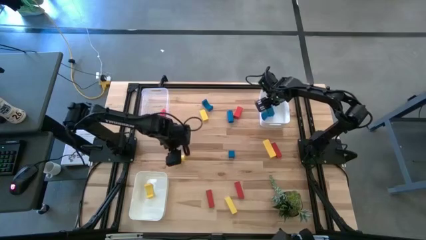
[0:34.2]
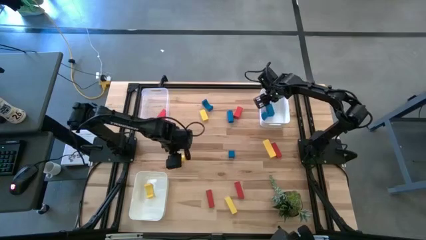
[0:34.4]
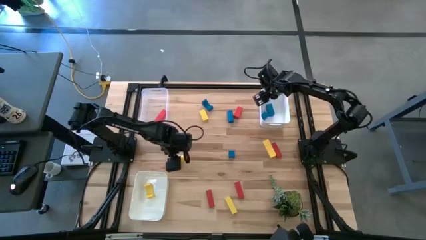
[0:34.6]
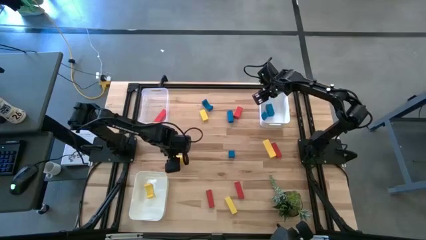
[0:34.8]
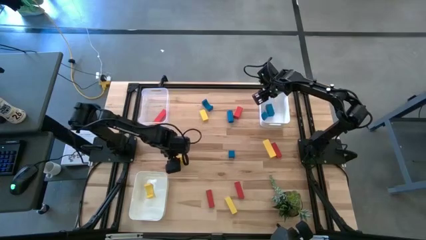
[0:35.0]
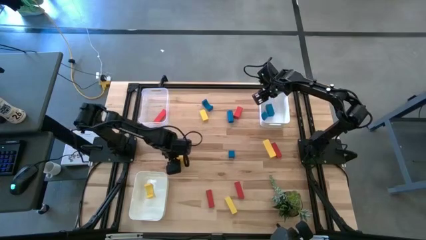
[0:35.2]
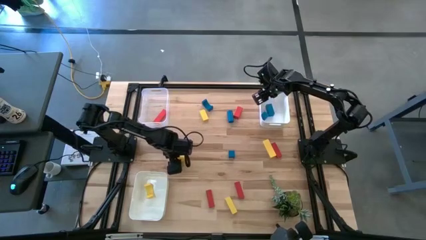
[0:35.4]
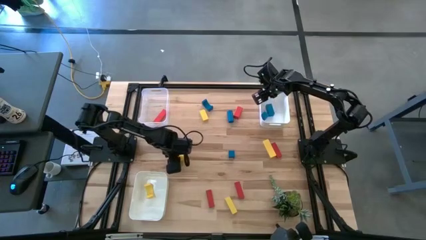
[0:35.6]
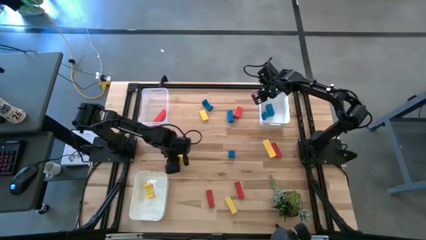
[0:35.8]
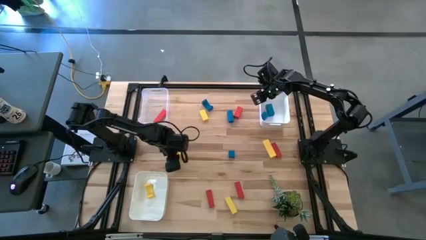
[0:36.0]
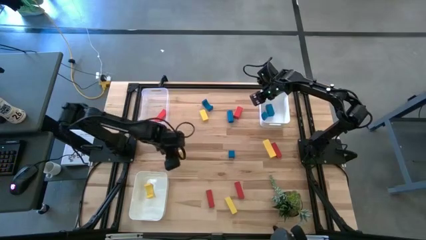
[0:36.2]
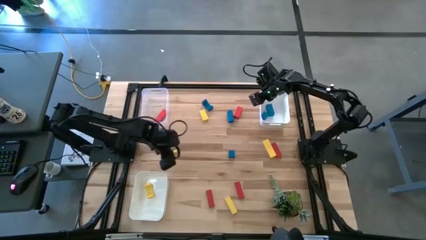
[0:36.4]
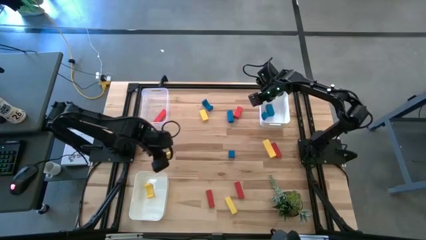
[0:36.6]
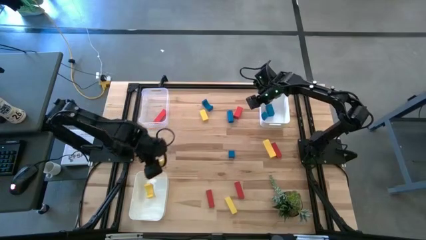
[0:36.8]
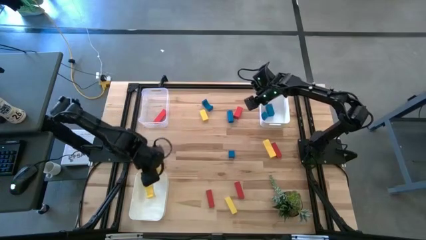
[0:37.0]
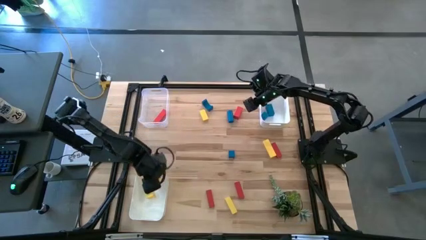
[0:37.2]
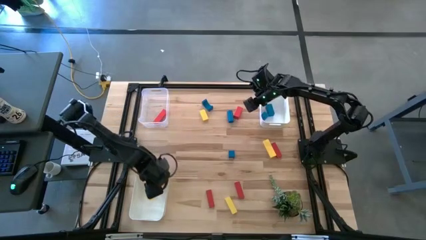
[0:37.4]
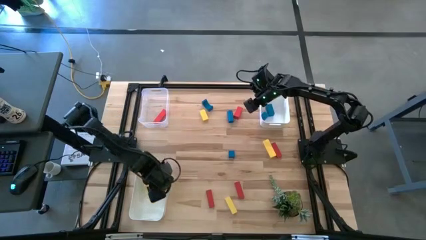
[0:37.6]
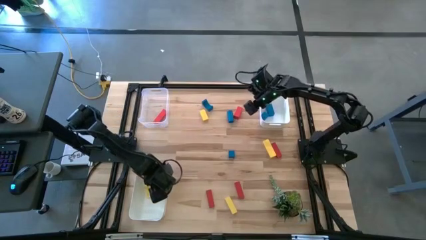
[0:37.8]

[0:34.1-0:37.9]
Task: Sort & place blocks by color
Put the yellow block into the bottom white bin

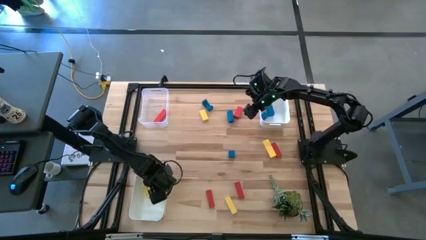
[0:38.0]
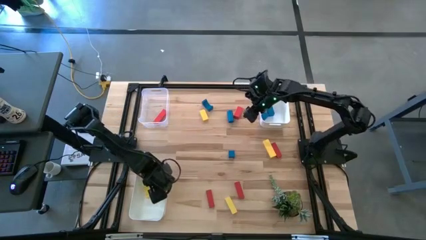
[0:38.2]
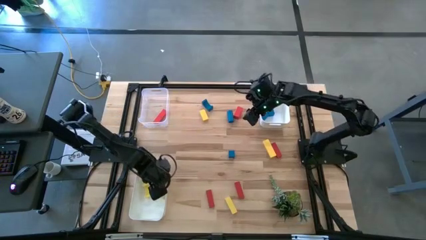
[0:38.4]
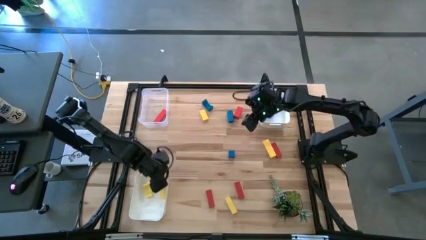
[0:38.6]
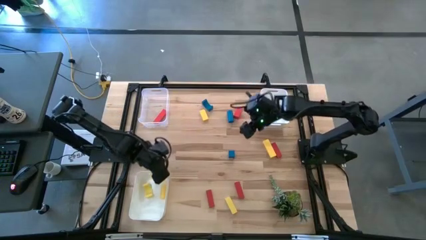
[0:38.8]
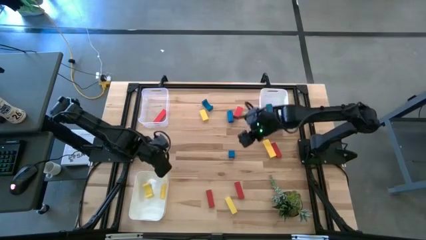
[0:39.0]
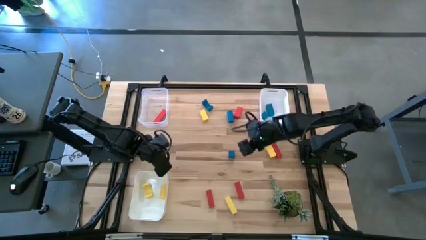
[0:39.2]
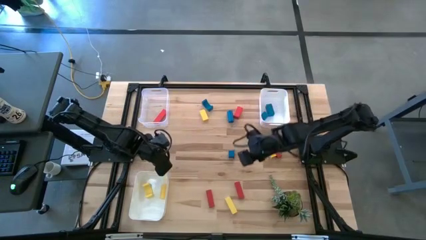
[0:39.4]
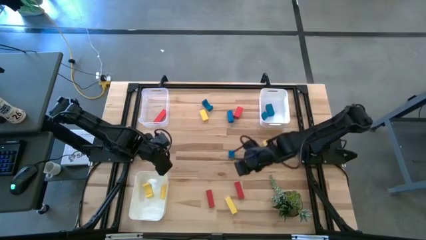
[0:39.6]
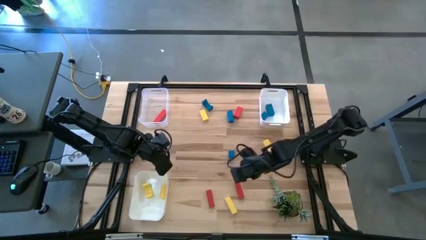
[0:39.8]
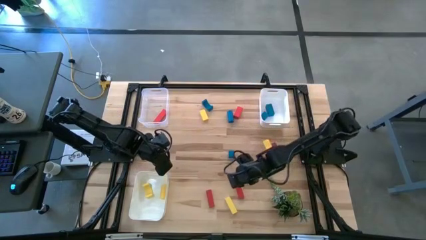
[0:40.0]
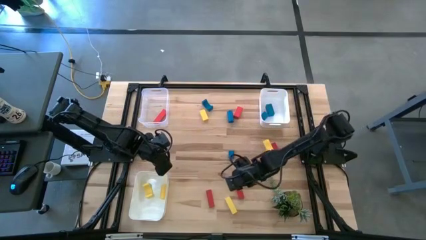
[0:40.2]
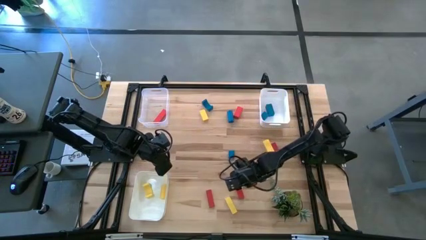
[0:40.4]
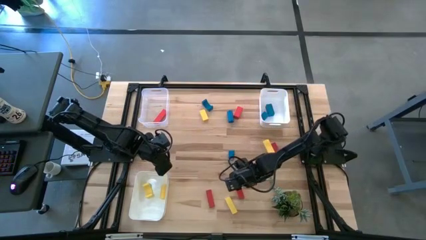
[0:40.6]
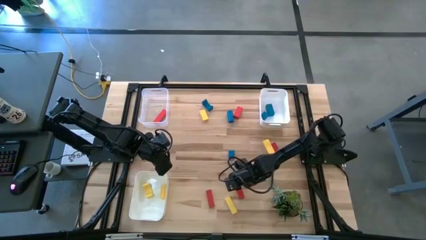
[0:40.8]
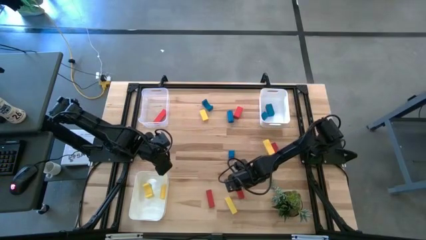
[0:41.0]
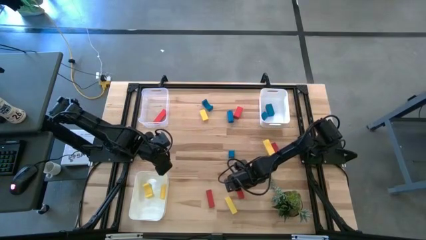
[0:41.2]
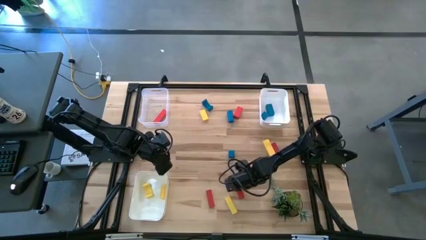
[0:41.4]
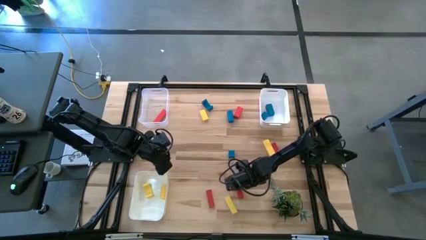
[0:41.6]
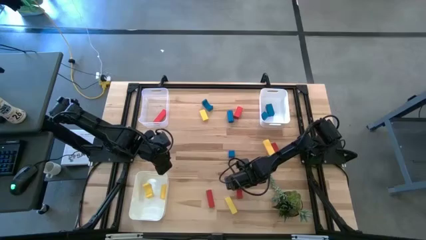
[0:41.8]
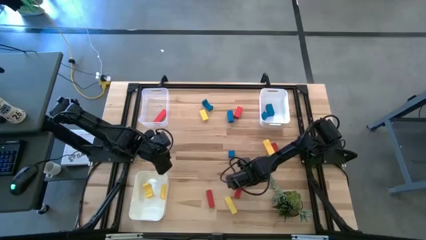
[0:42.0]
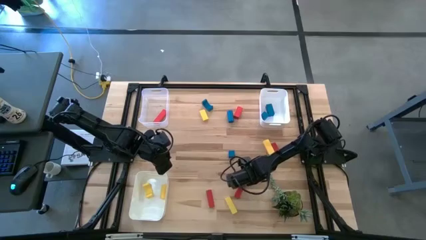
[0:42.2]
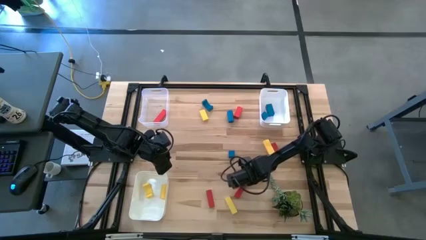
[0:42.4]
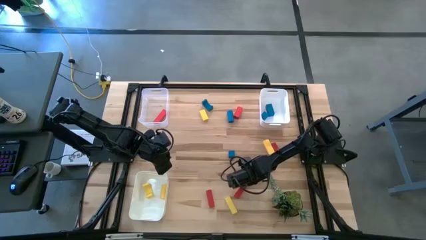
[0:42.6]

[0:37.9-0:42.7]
Put the red block into the transparent bin

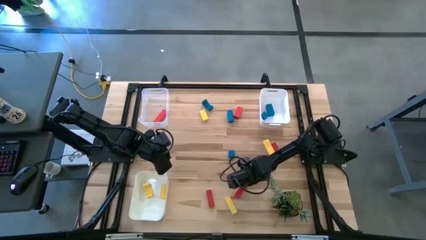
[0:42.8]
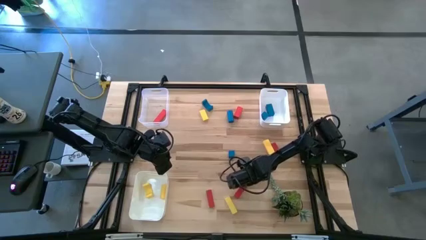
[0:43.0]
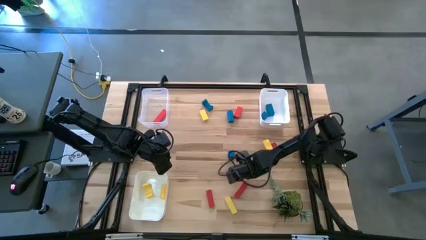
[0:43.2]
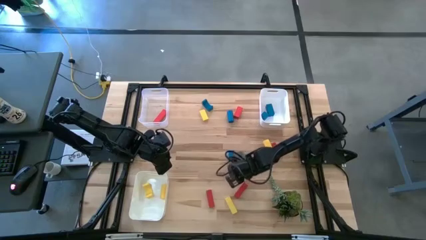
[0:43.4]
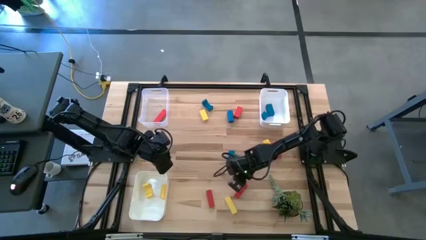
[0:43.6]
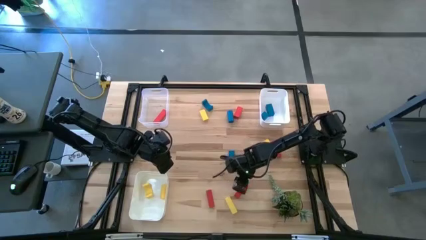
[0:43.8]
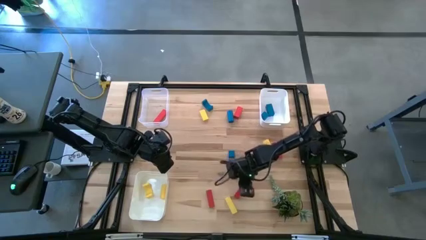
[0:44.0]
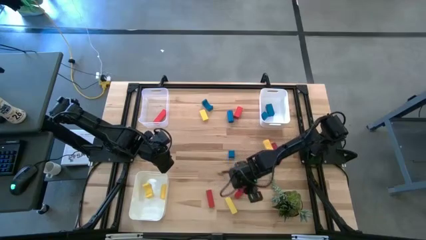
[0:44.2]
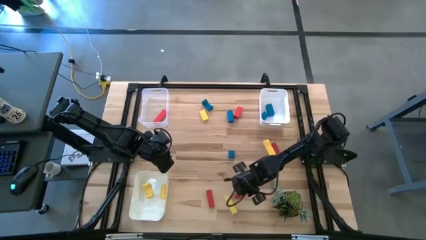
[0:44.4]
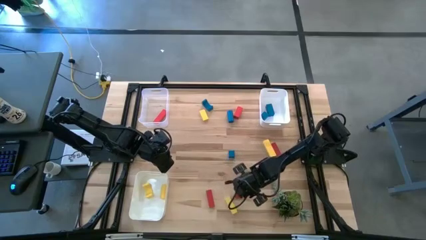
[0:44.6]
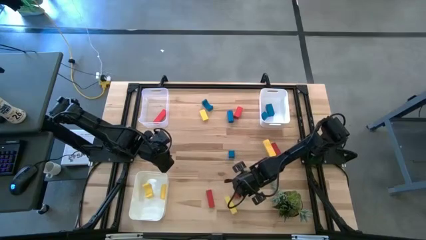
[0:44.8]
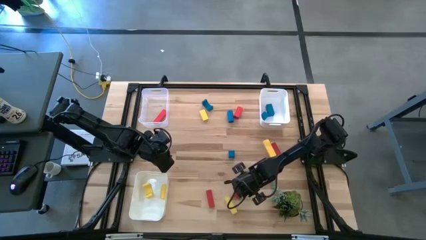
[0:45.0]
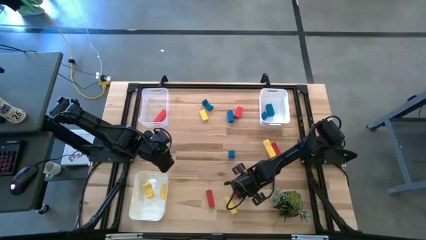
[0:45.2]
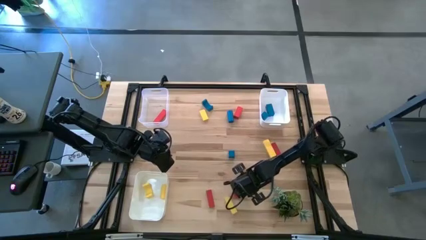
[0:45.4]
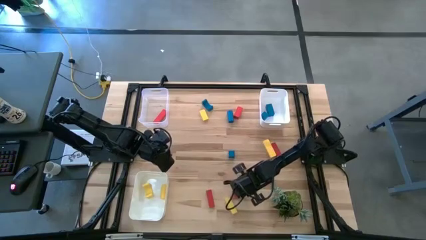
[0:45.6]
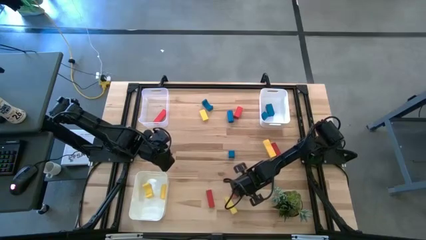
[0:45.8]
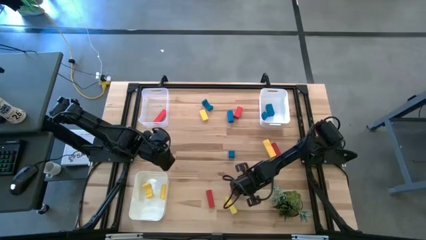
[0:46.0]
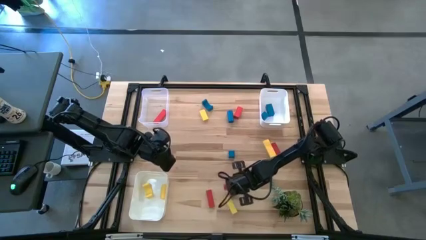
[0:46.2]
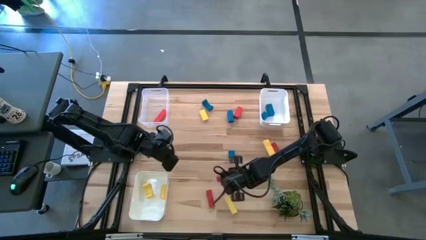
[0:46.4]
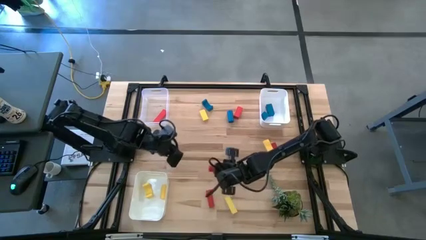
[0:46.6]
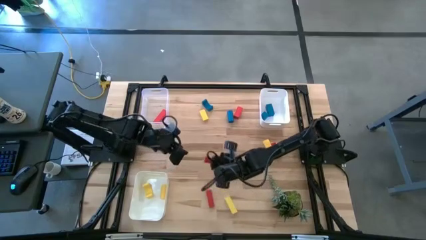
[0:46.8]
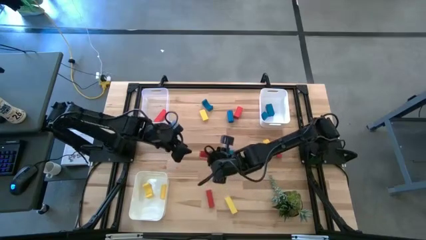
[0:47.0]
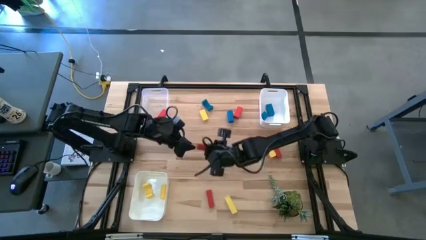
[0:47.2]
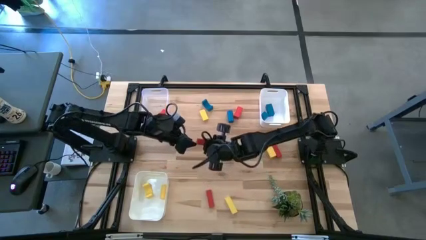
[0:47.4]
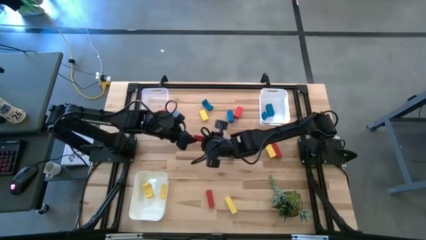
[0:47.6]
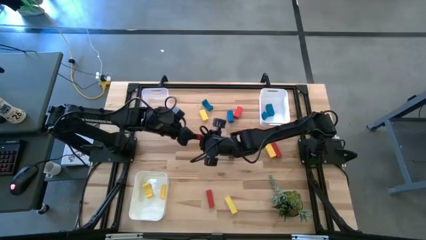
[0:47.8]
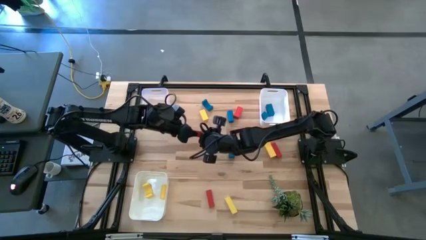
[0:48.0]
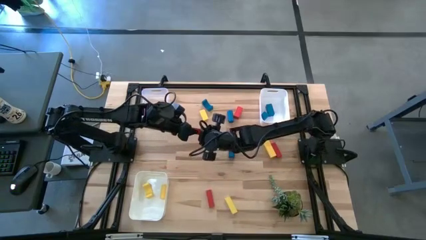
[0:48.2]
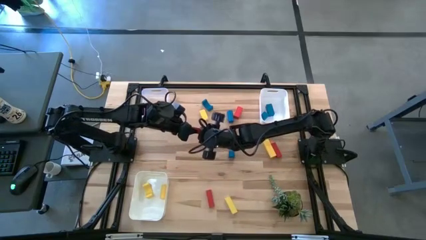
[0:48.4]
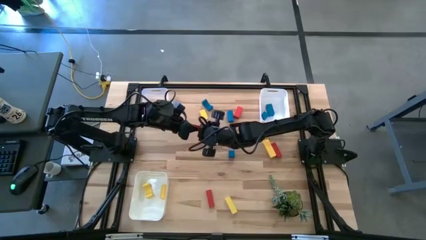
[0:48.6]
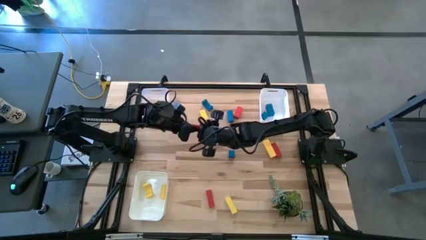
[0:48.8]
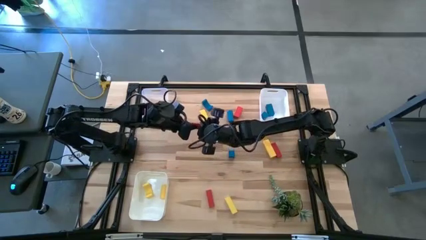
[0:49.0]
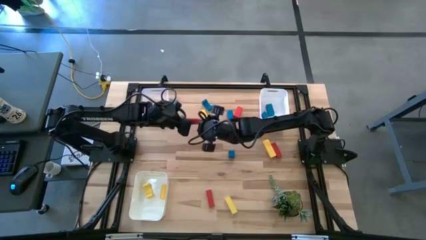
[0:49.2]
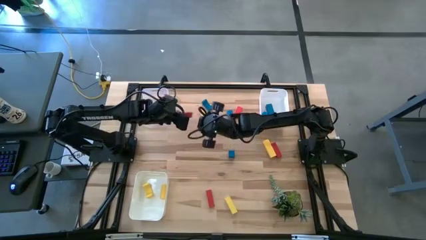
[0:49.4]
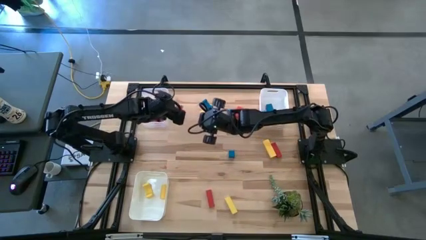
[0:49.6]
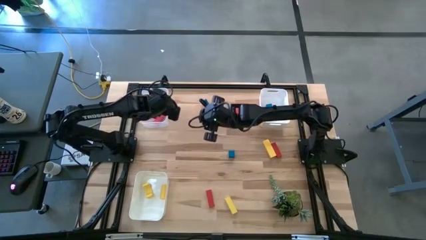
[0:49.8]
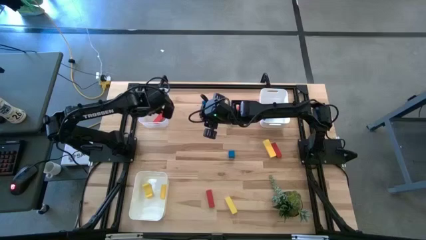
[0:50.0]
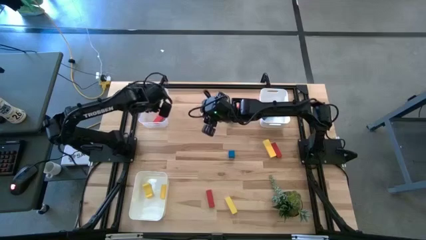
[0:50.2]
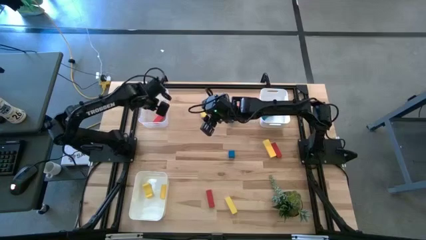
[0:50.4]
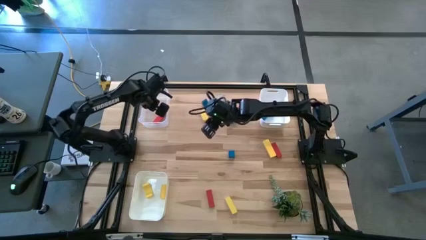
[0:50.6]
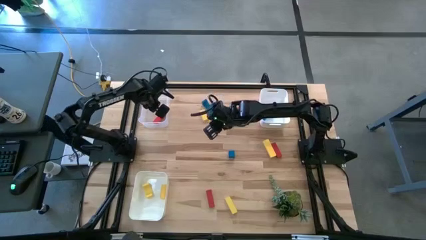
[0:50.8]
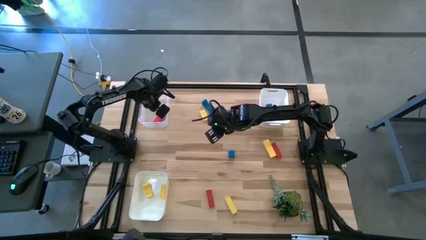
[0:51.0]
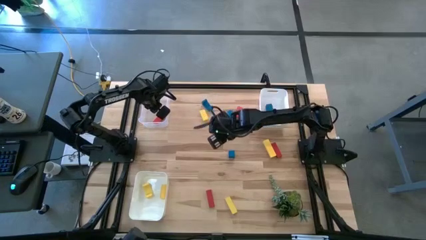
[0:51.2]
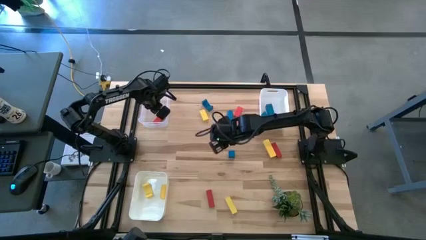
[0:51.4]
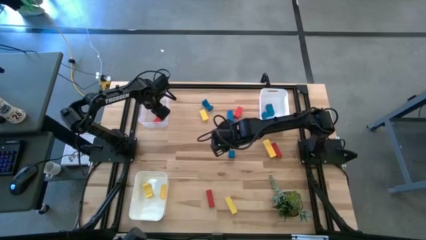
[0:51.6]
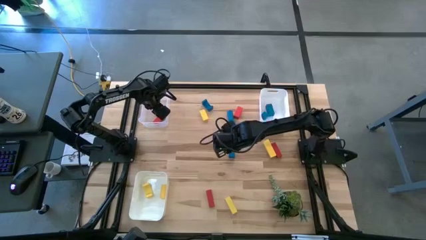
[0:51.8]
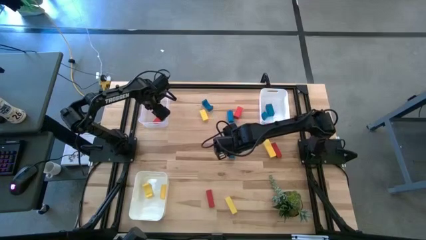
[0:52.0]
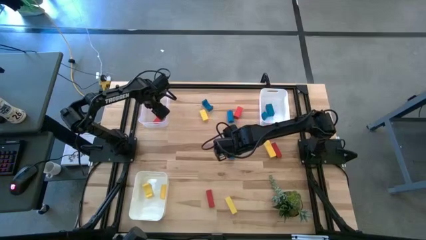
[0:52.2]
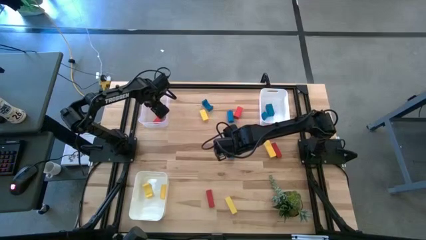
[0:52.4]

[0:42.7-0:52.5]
Put the red block into the transparent bin
